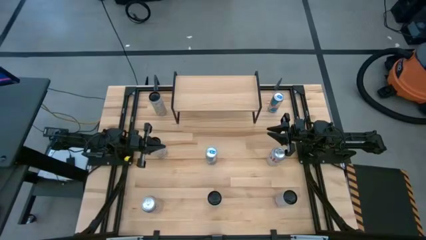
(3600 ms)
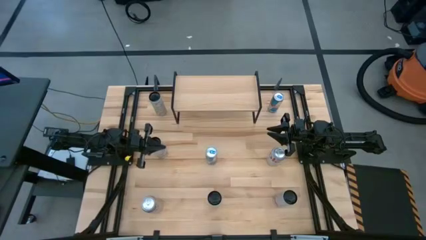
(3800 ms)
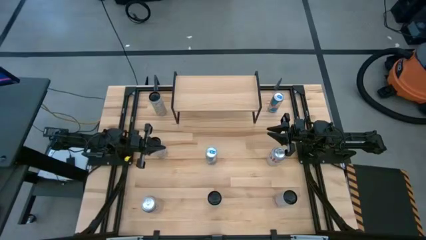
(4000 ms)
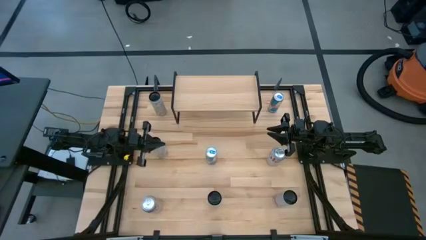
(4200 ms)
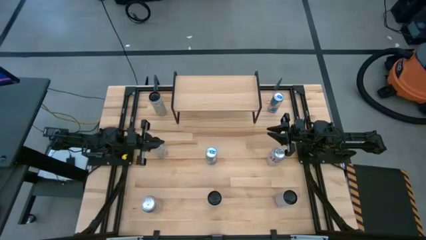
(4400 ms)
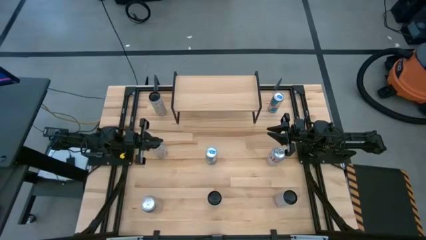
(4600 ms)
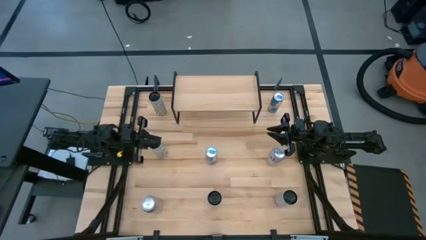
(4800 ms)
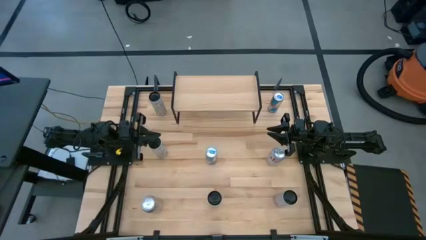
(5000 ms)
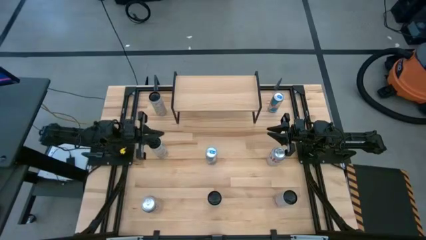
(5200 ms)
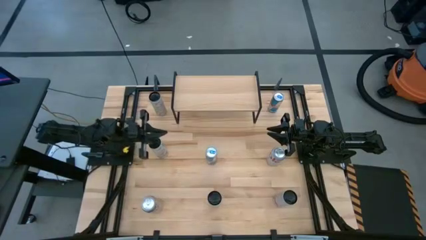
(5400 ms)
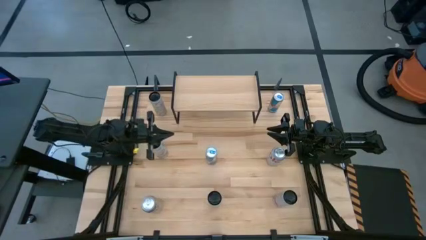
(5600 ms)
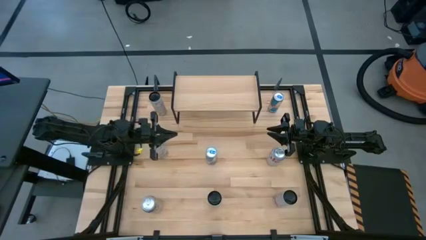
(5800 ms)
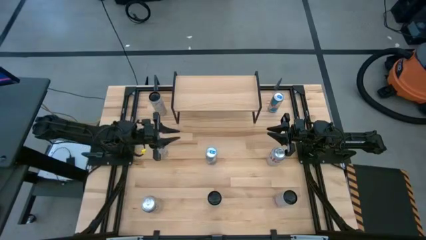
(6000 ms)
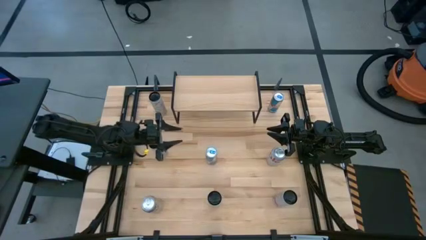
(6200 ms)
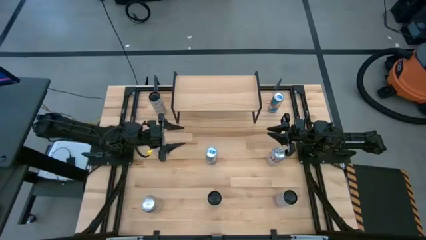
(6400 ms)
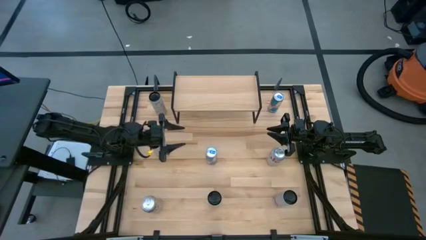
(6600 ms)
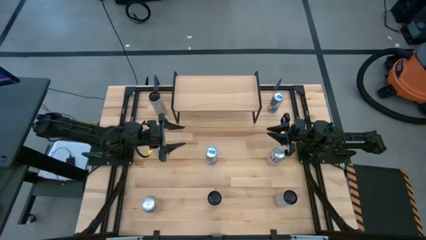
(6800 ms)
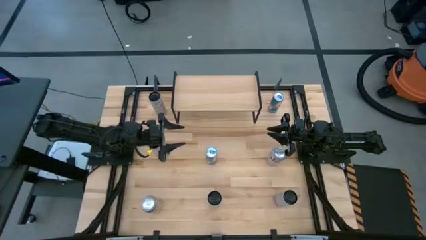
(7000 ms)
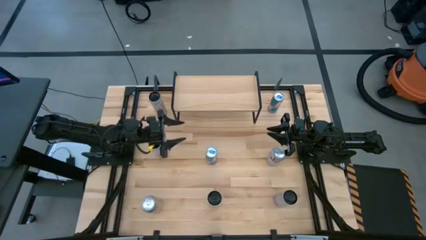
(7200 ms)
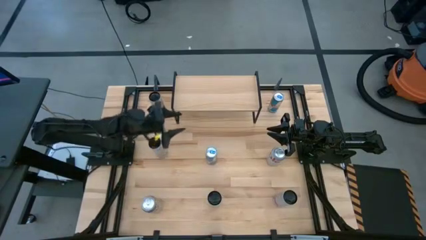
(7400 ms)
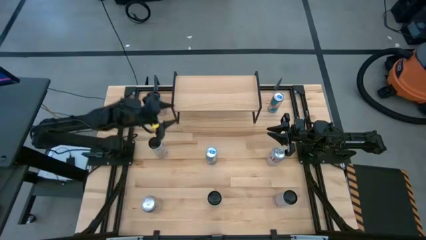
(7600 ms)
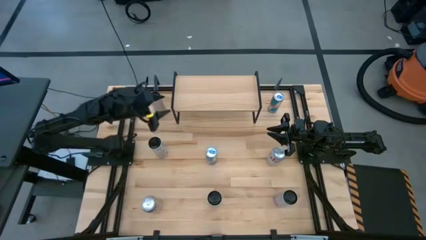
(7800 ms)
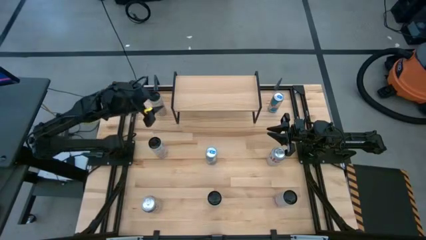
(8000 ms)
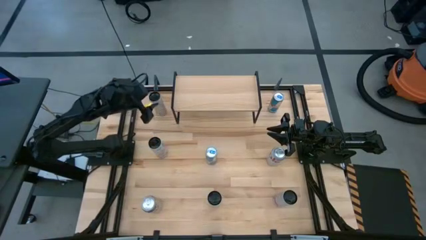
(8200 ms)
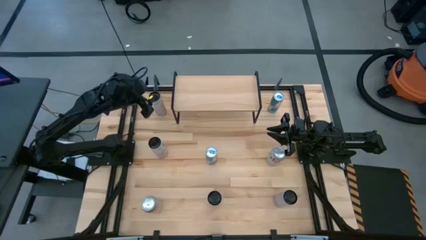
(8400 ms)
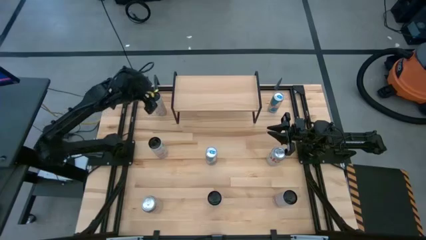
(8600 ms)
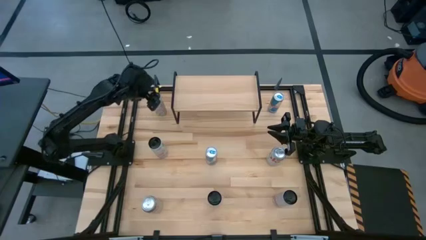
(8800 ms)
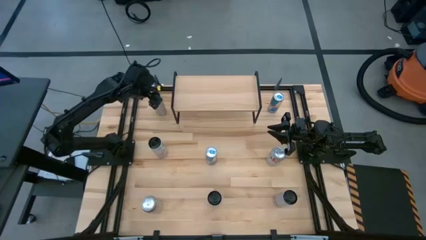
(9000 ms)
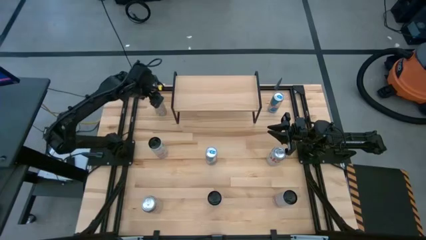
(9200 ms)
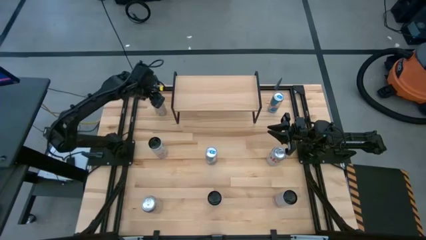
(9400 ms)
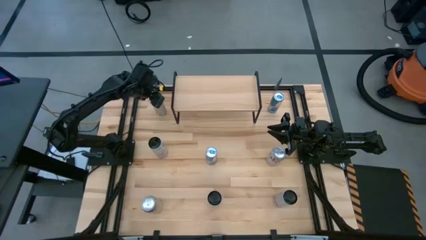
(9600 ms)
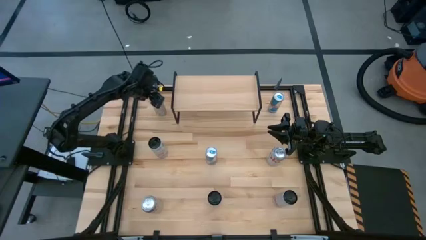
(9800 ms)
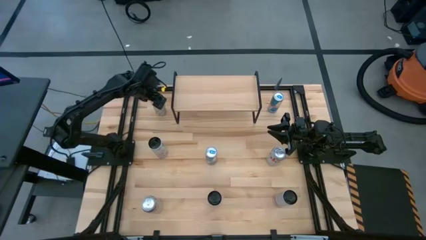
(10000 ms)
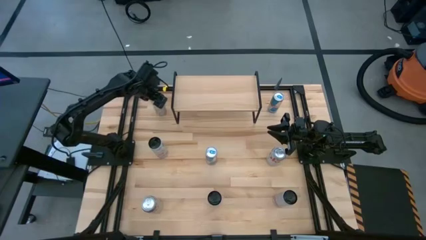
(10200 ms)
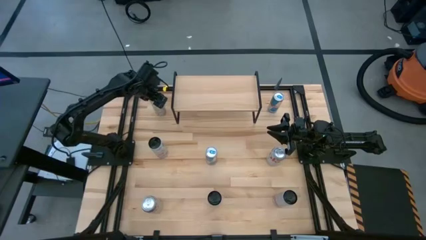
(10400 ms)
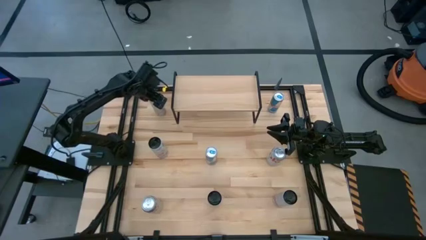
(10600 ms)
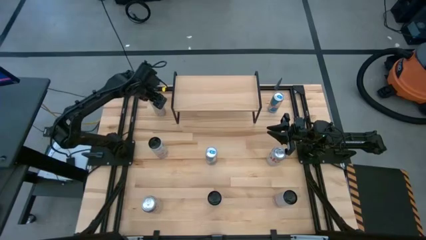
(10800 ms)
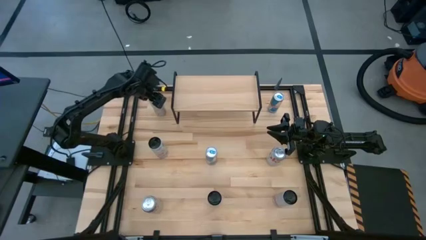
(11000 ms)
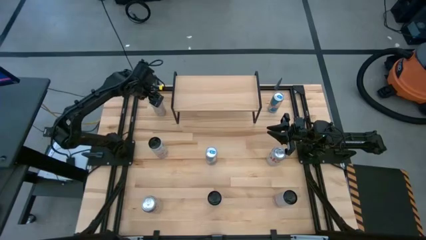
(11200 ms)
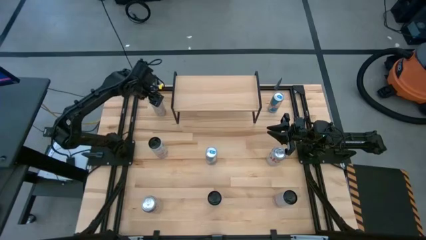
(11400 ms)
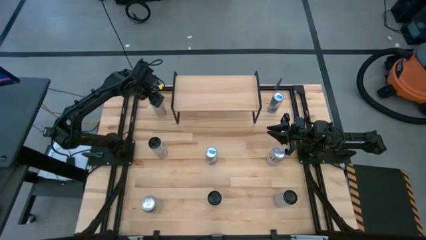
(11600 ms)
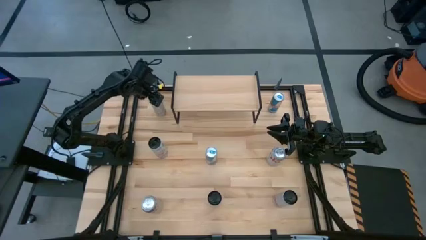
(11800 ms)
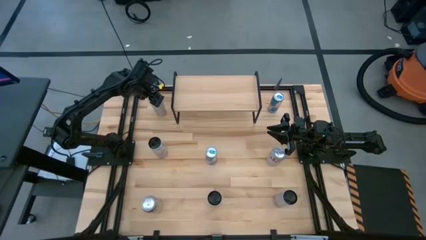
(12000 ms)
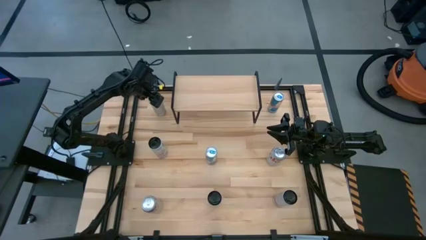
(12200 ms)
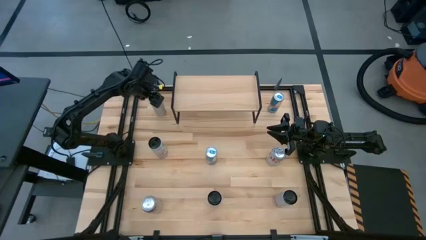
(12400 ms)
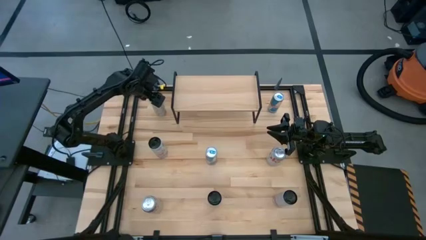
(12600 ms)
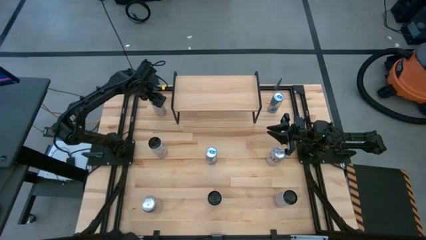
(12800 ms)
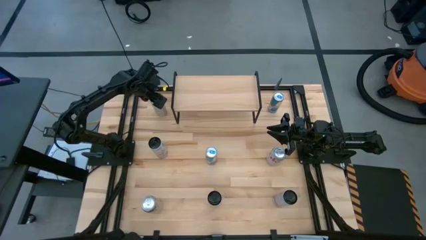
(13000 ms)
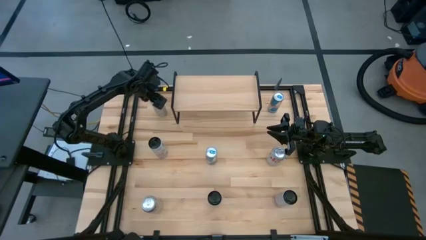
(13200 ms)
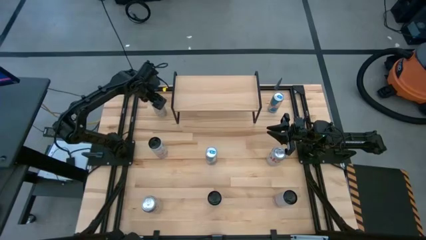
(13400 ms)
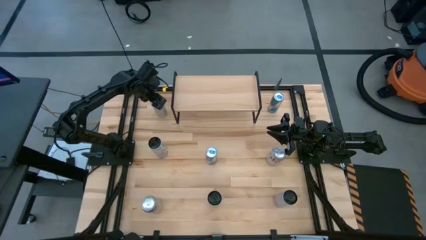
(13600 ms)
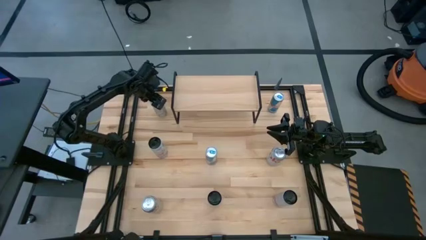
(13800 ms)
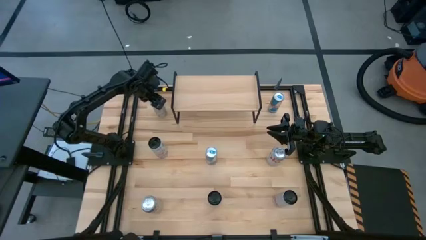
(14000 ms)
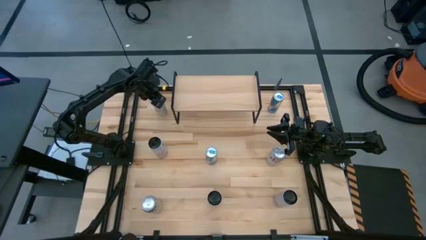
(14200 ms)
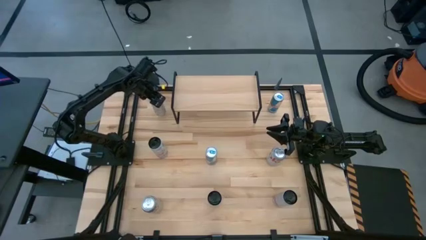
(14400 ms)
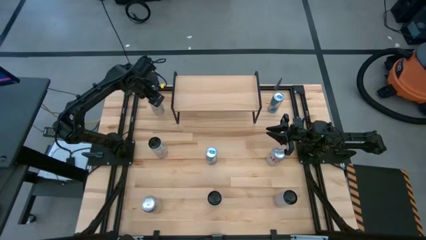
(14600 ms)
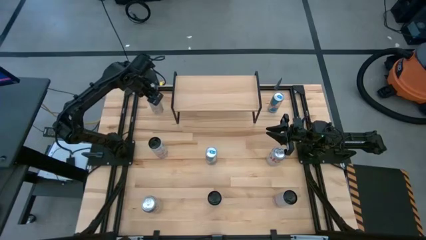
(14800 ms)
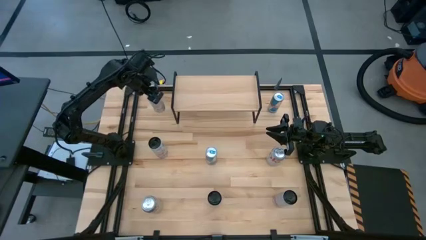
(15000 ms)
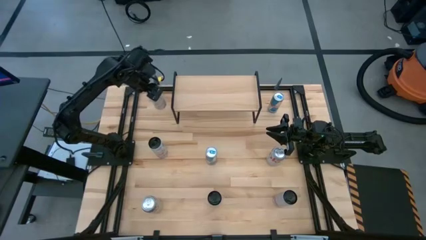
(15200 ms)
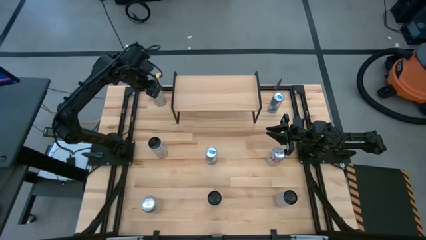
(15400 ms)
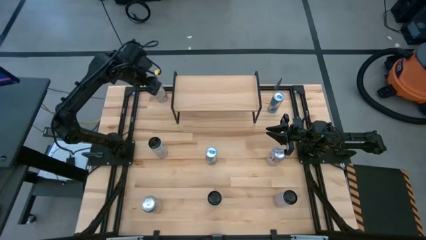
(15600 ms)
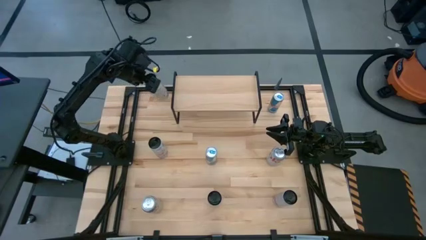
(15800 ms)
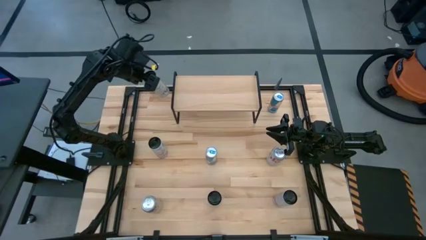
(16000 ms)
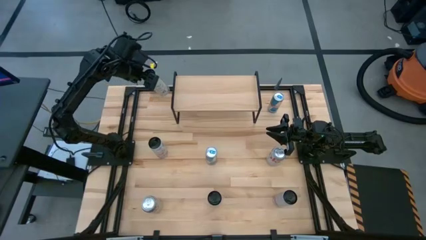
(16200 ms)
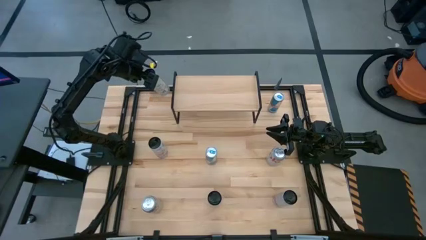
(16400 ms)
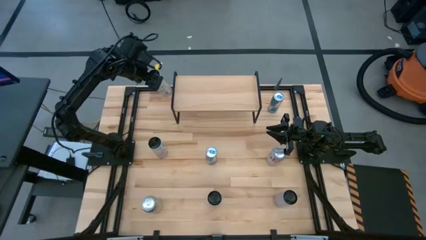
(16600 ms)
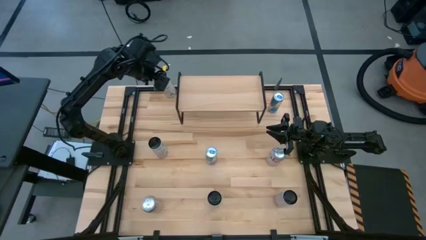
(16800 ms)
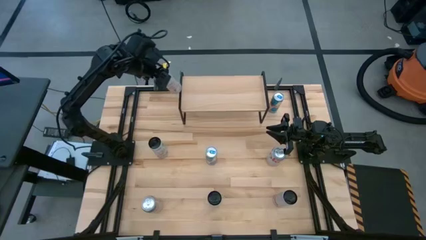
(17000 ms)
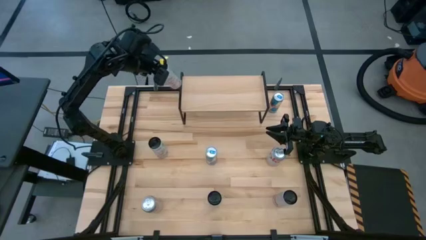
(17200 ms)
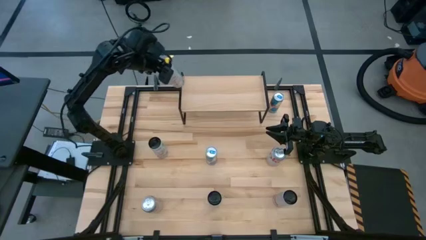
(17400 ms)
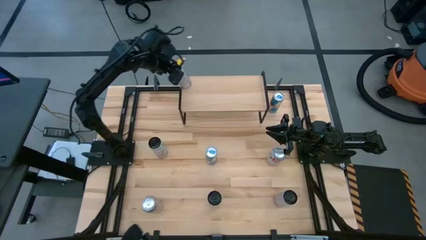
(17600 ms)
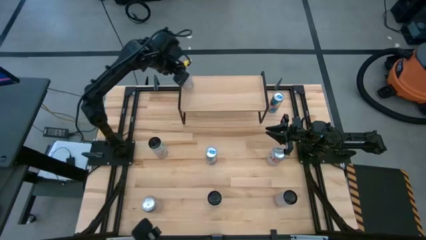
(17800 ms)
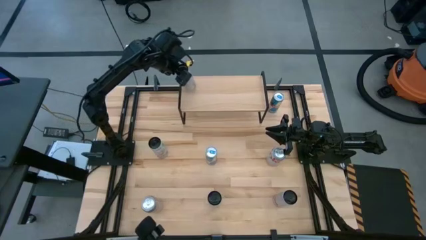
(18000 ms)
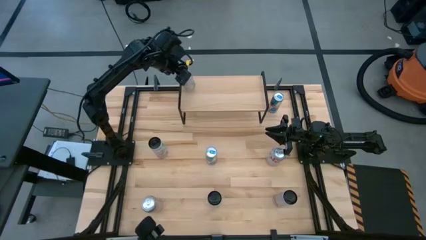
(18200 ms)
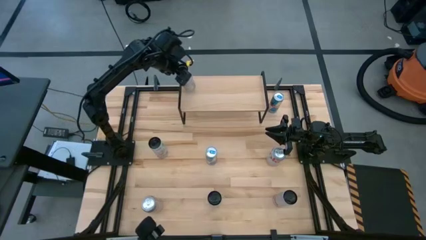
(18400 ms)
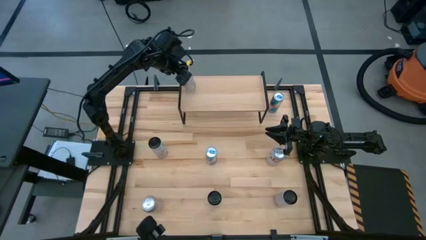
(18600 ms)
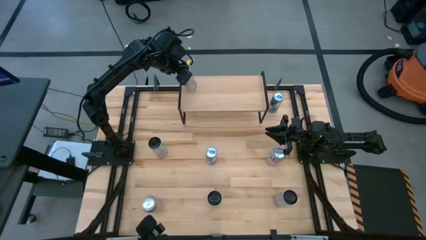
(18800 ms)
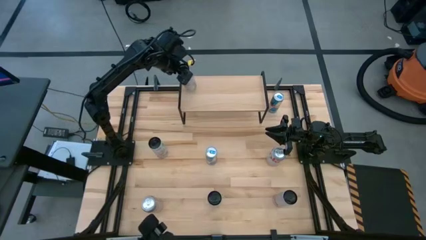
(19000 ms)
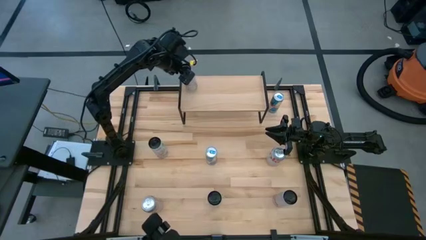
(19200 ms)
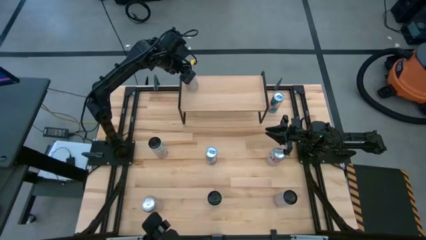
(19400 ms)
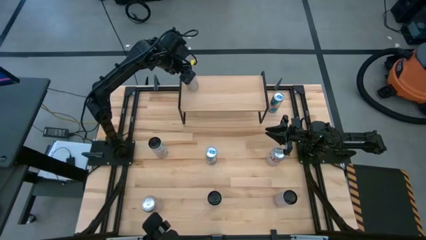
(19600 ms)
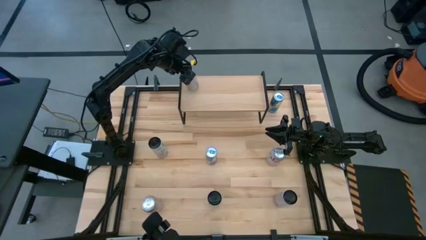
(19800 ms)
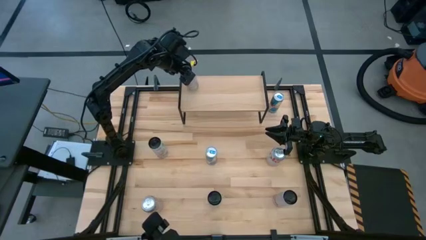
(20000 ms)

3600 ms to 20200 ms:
Task: Place canned beverage on shelf
Put the white soda can on the shelf
